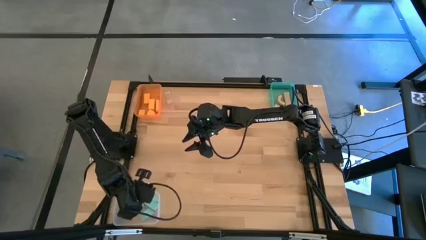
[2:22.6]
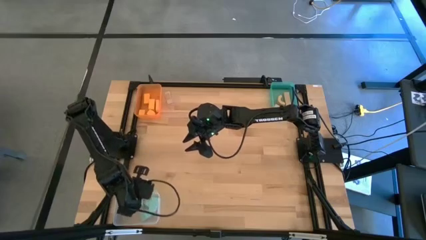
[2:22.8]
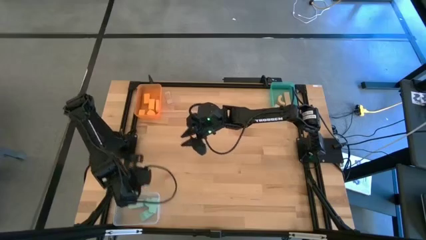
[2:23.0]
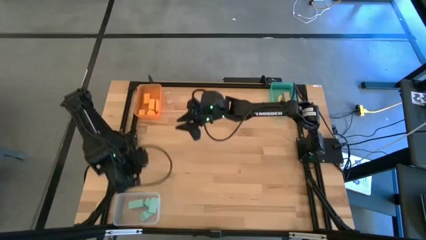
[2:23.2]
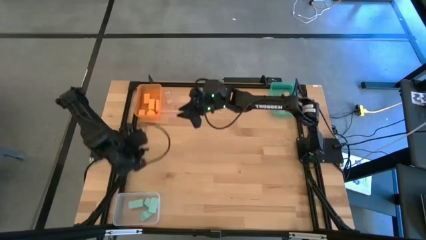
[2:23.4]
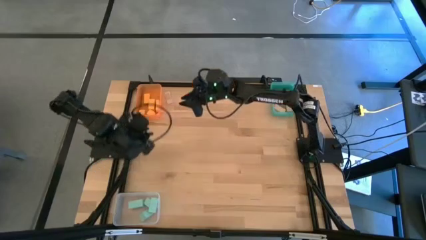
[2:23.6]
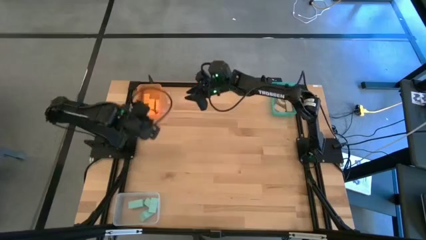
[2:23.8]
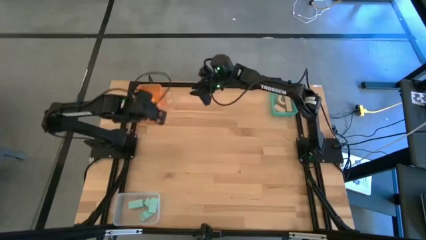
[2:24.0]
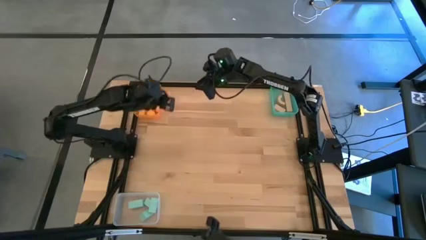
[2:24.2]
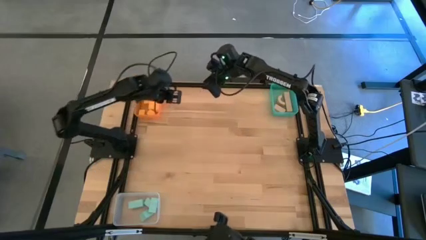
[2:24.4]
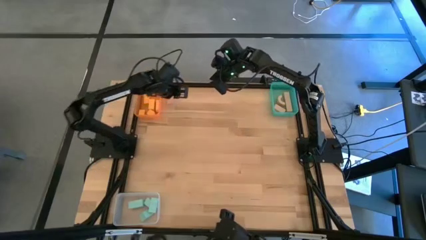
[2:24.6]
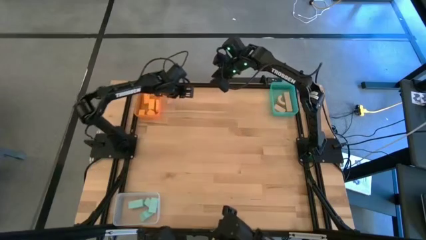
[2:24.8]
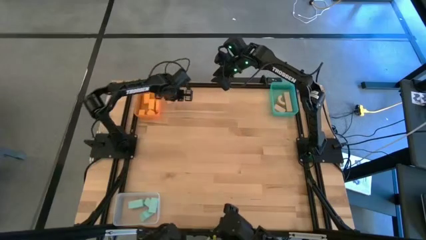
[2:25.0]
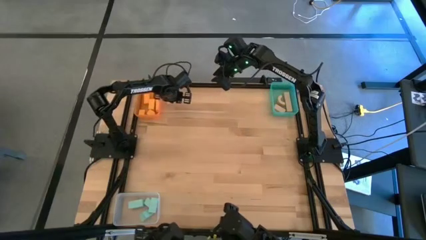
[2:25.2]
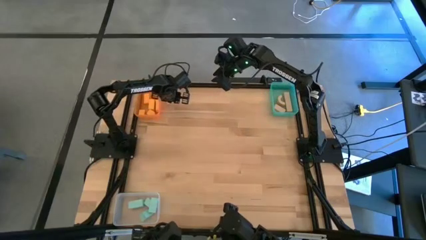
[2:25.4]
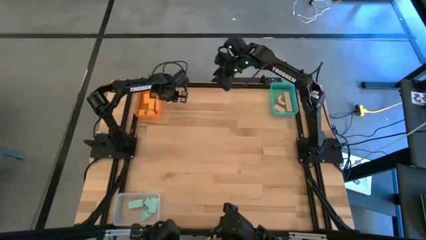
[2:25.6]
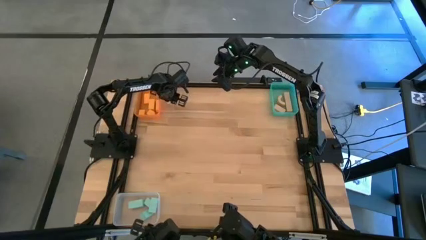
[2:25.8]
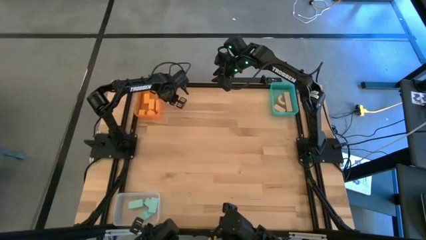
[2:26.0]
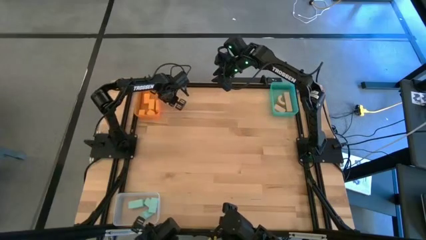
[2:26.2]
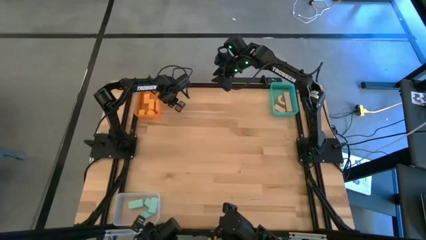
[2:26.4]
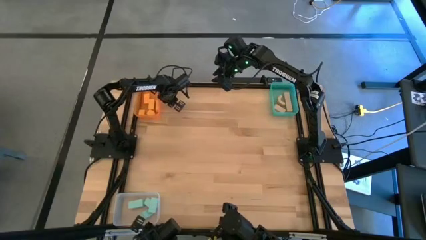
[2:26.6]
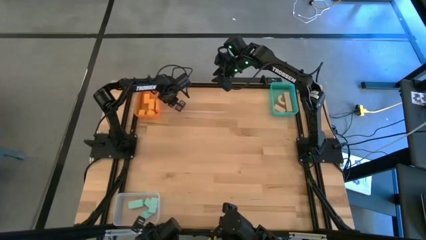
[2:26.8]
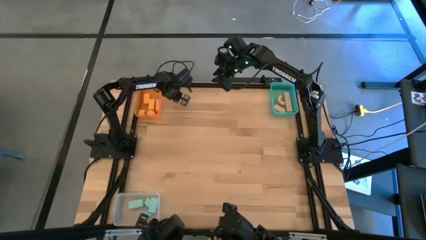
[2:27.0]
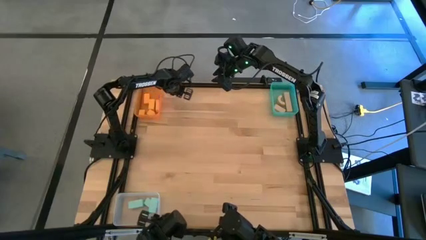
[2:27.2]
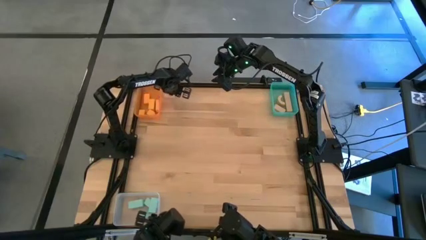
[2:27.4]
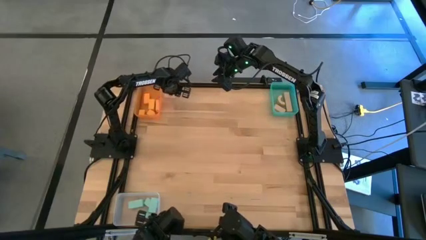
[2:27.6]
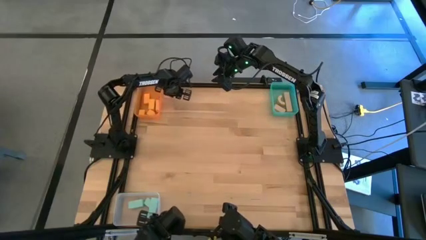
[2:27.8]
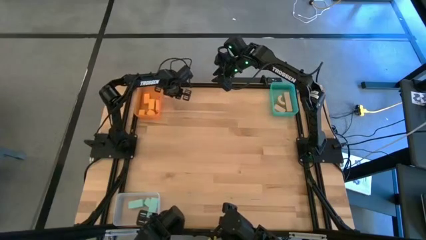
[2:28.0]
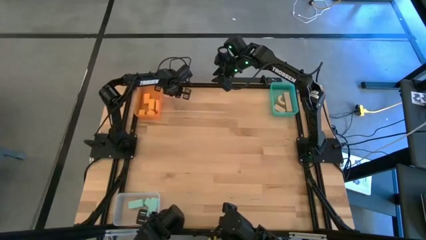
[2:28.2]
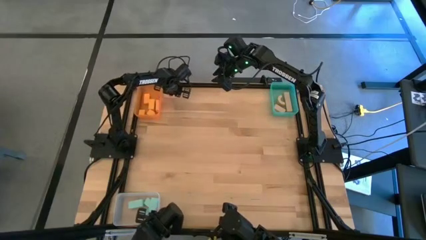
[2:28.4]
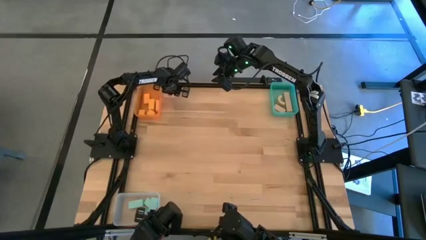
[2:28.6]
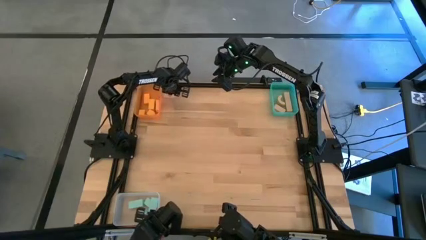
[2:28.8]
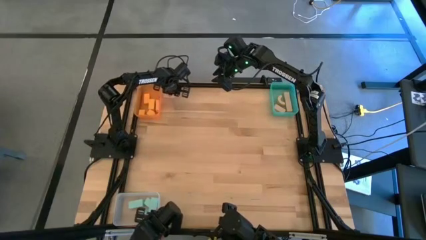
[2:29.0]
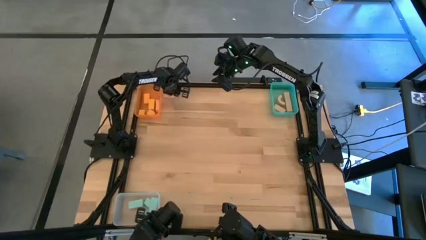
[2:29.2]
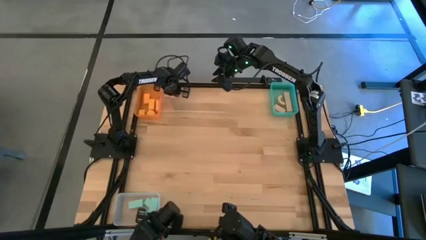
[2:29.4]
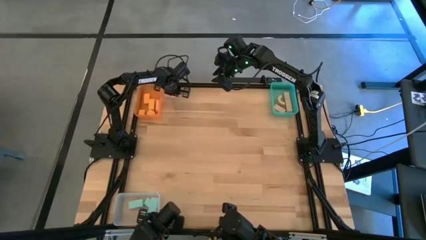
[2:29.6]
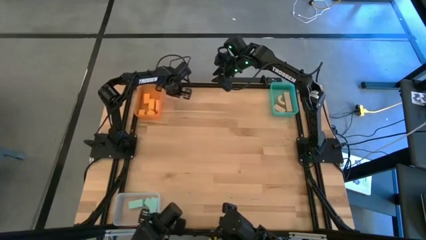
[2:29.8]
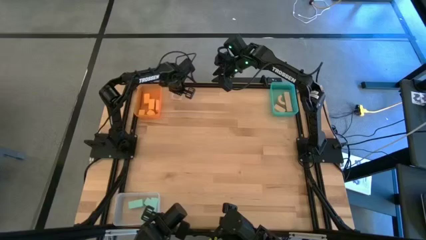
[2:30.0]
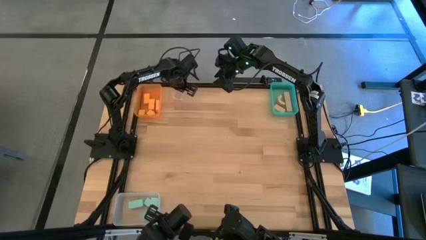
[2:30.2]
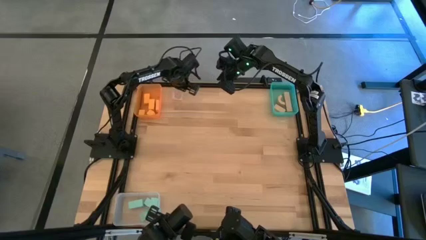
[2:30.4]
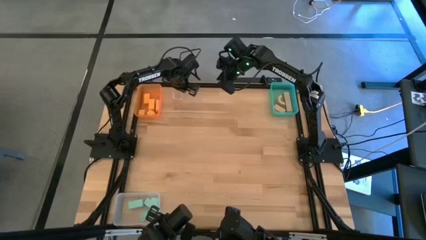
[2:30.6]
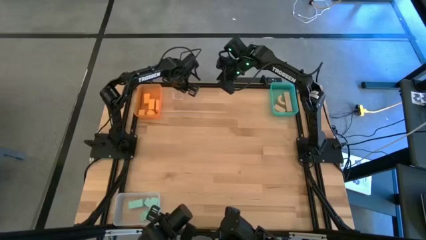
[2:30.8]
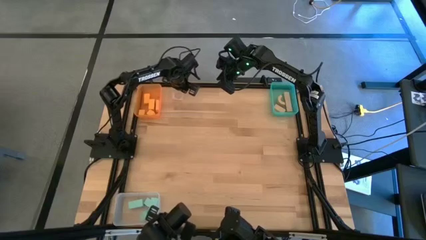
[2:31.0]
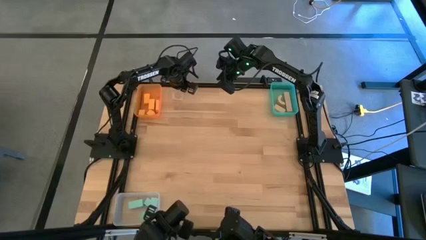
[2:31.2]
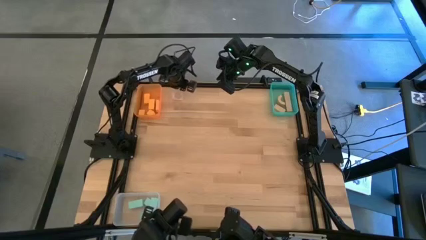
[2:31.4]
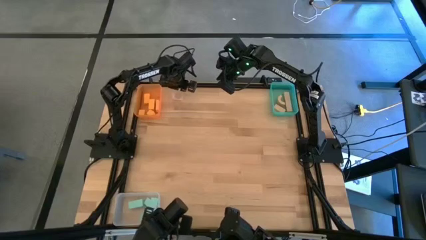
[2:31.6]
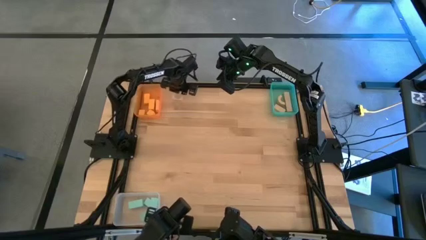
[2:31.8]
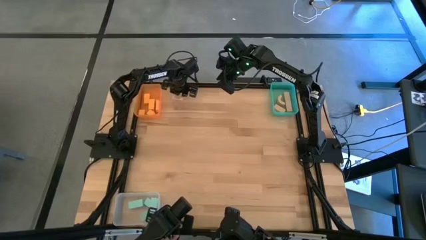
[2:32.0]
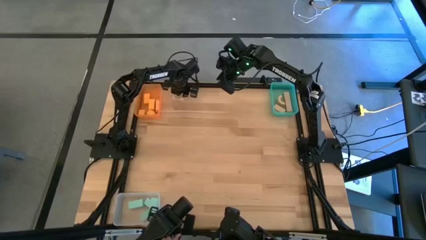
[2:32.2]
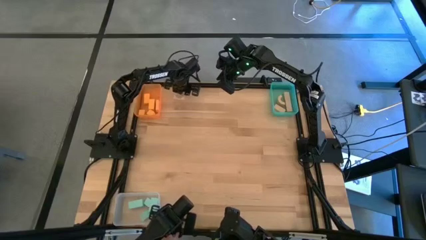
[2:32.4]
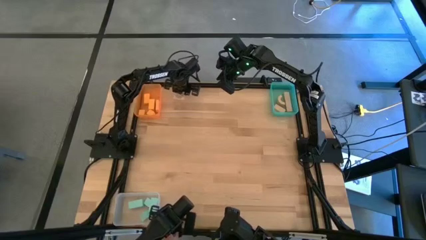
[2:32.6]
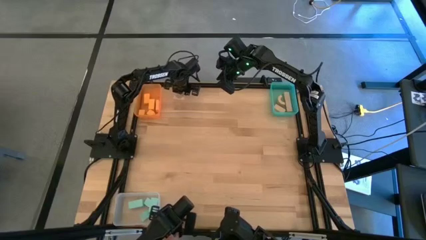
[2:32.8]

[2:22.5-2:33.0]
Task: Sort & place blocks by color
Put the brown block into the blue bin

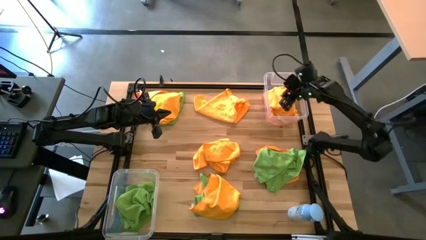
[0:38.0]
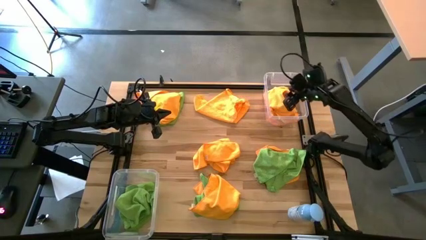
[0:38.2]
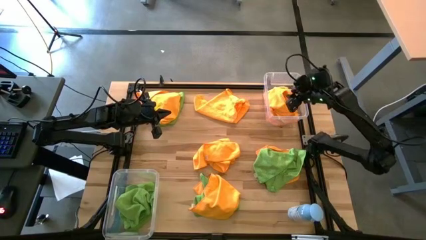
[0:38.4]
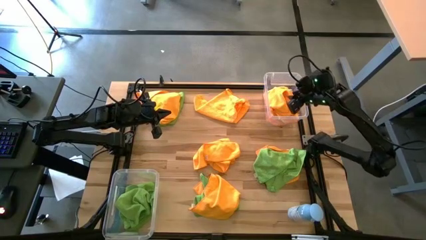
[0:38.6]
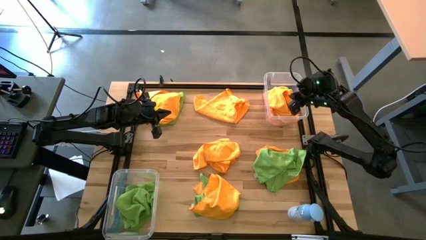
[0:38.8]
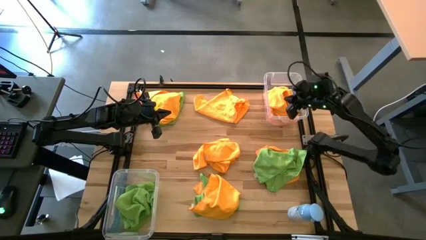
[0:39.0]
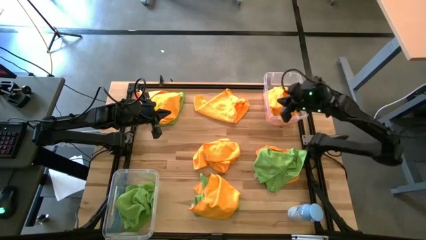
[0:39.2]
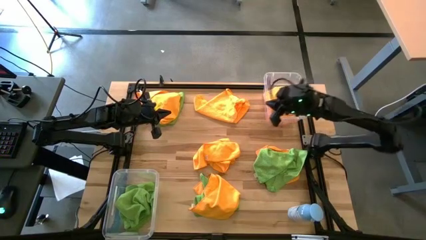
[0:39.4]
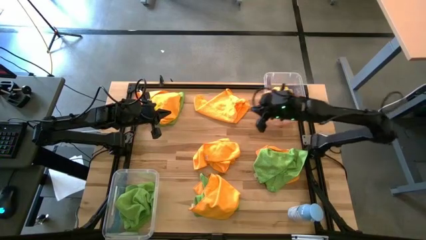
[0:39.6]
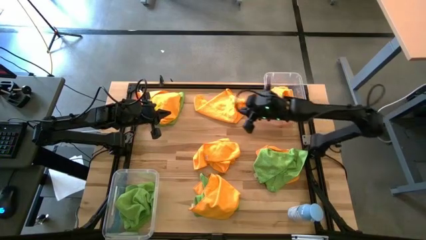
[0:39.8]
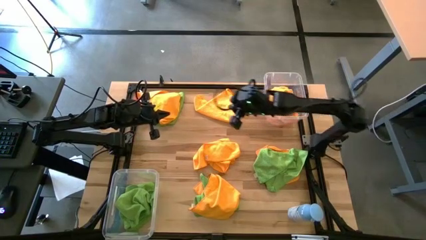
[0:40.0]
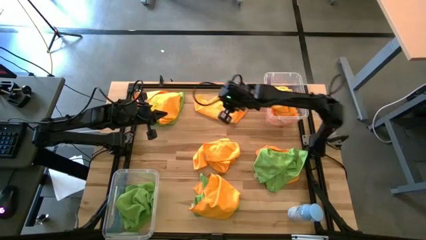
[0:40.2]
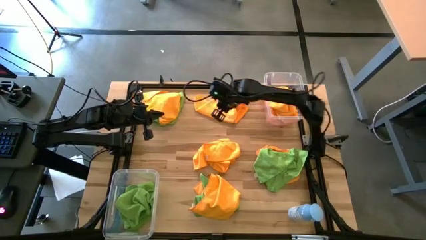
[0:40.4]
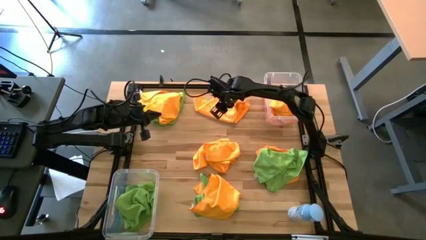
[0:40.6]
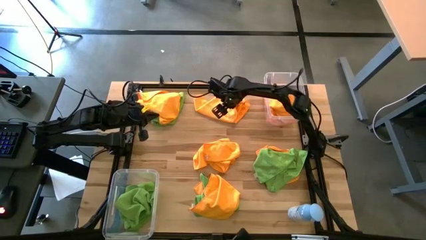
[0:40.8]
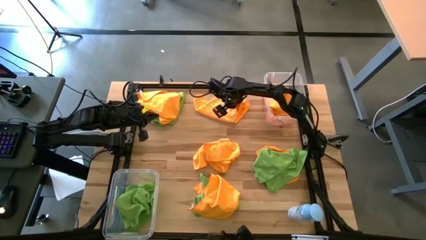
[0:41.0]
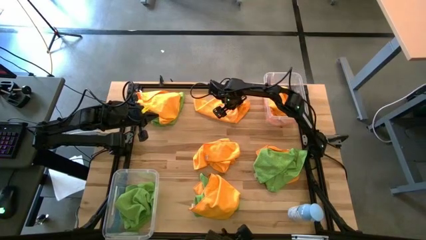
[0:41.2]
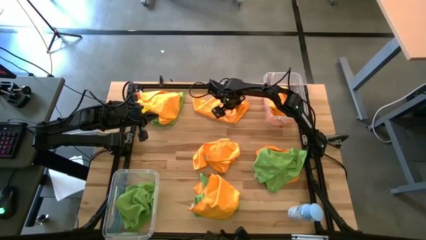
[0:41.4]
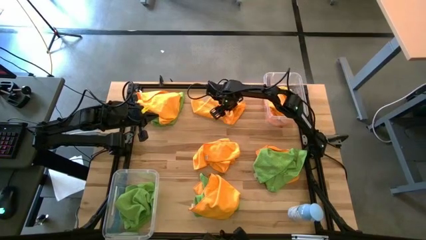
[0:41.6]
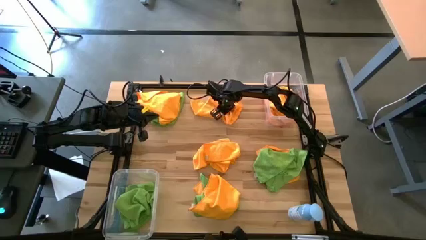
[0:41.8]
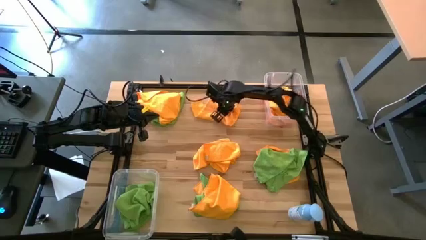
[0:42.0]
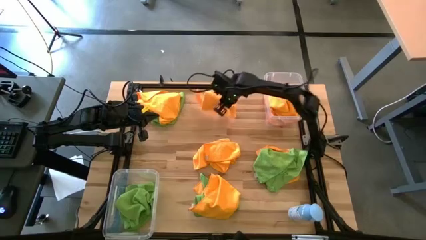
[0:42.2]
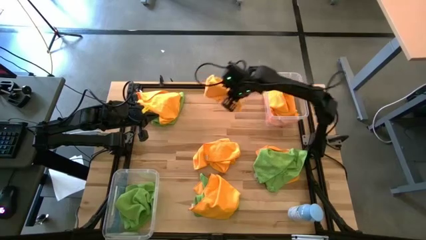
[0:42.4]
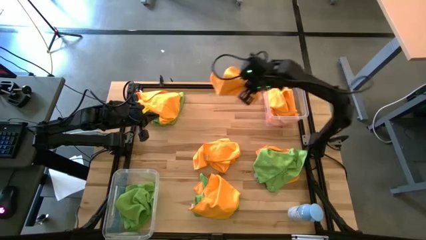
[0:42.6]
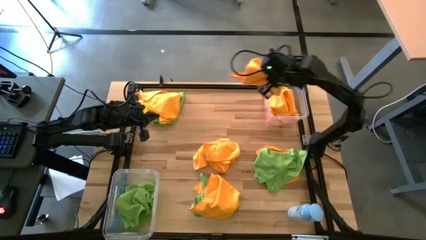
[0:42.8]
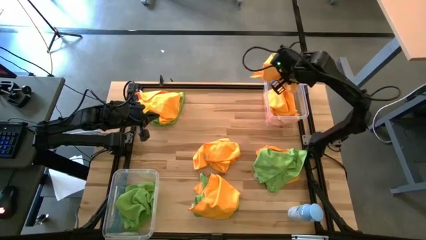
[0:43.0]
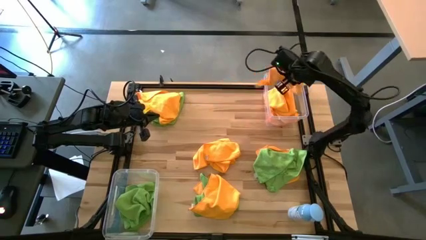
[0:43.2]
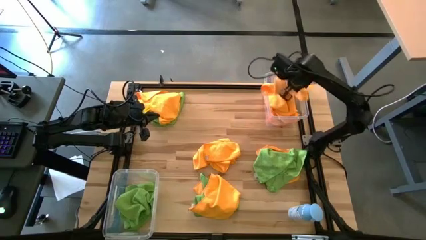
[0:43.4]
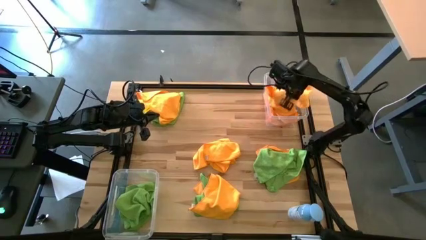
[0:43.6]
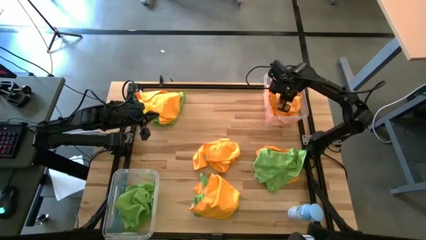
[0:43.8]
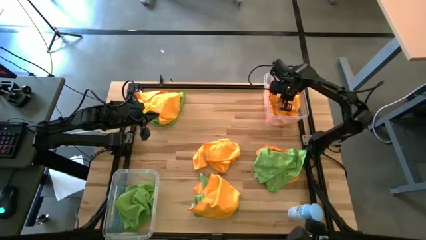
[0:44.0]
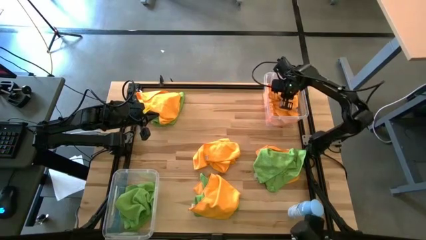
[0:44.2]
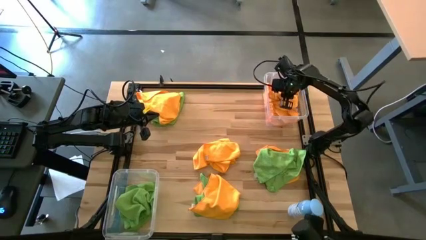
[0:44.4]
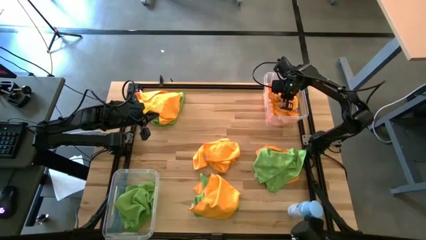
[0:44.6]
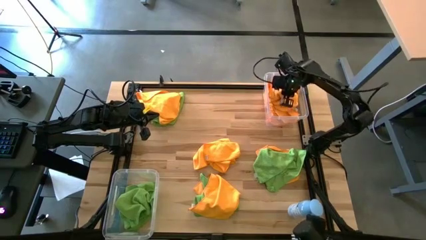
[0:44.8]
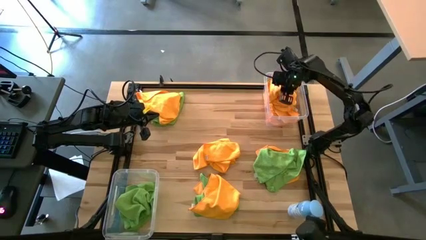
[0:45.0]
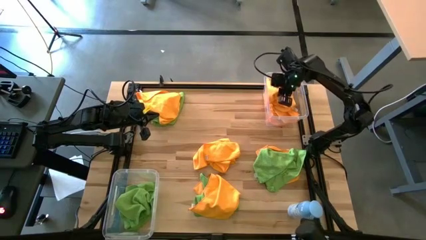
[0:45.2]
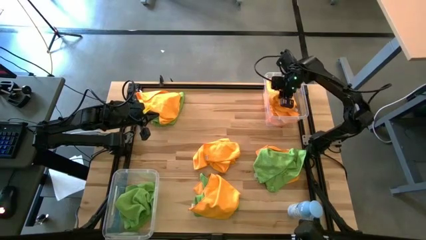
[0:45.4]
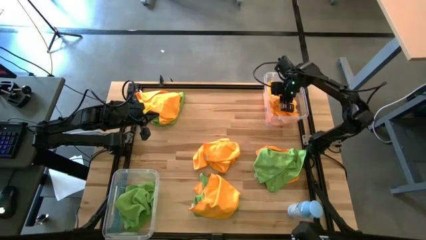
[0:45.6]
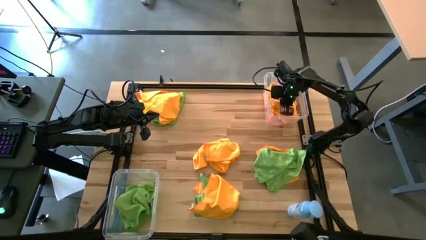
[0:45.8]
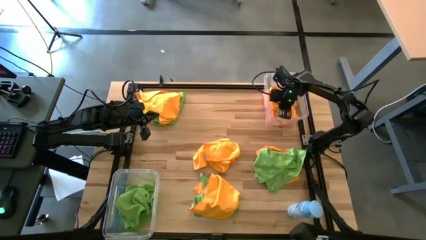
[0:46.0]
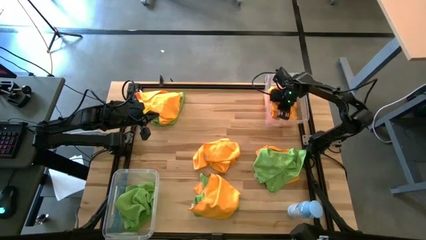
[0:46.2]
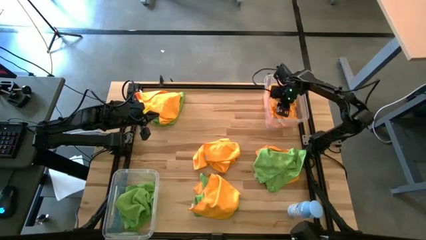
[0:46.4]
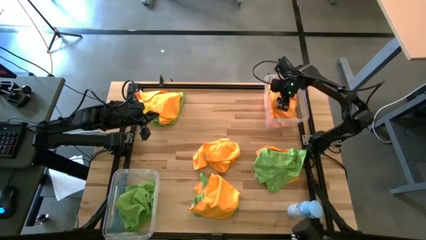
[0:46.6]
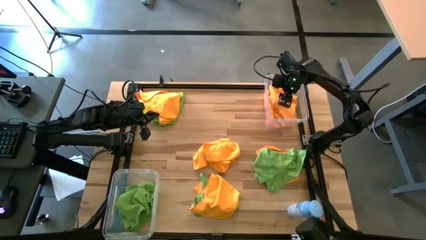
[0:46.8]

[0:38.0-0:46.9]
Task: Sort microfiber towel by color & place in baskets
Put the orange microfiber towel into the top transparent bin
